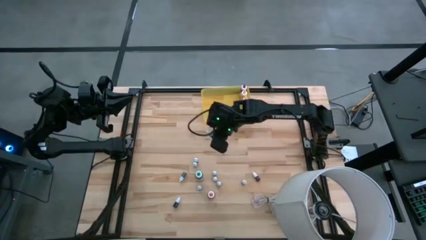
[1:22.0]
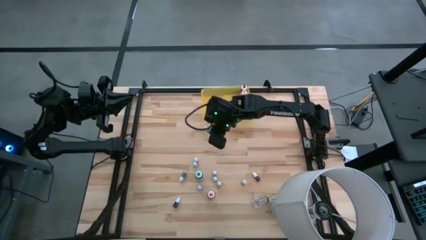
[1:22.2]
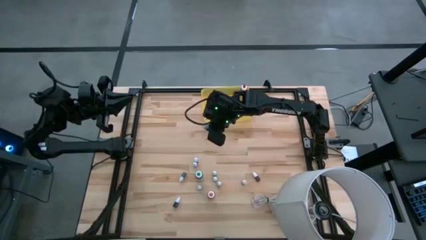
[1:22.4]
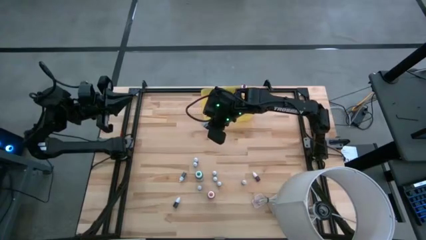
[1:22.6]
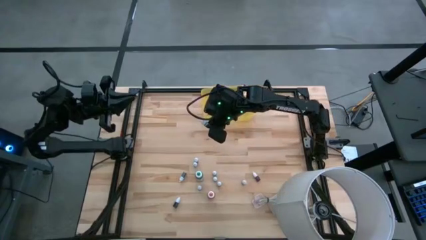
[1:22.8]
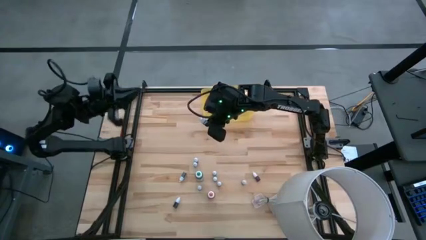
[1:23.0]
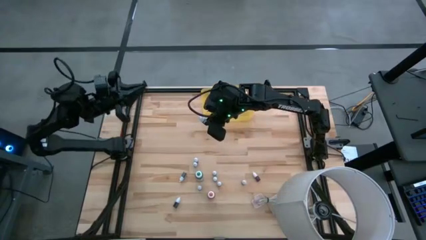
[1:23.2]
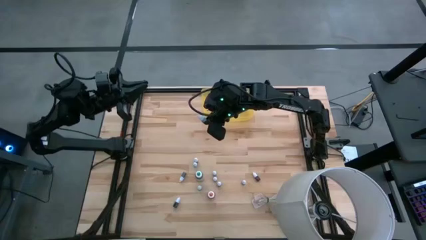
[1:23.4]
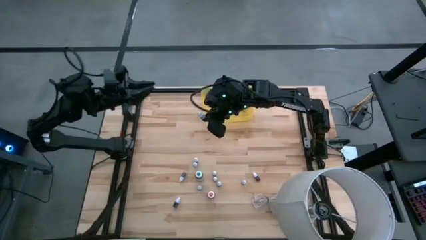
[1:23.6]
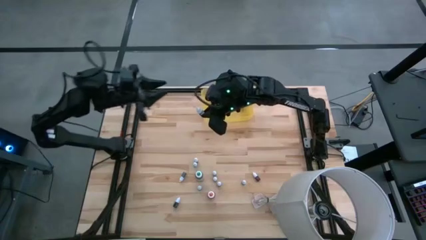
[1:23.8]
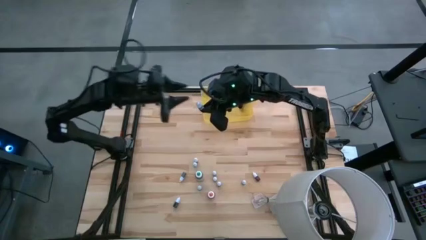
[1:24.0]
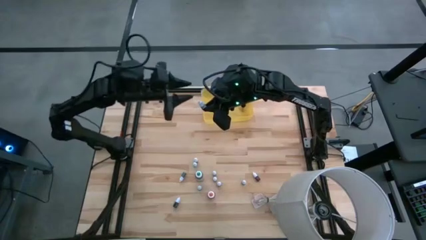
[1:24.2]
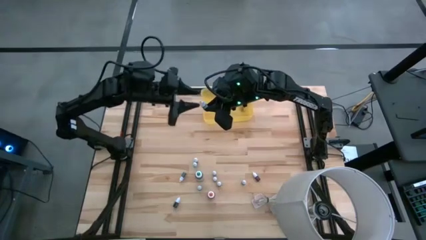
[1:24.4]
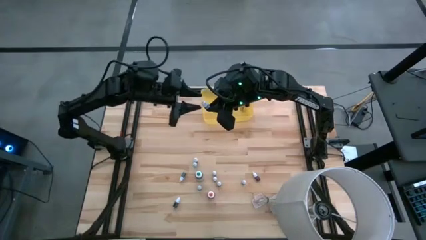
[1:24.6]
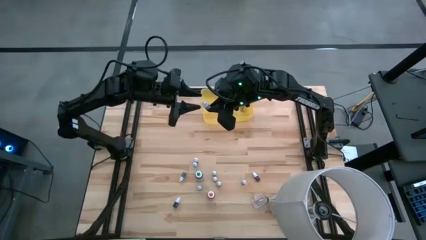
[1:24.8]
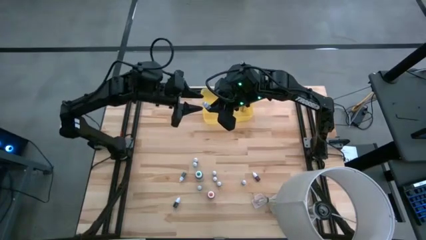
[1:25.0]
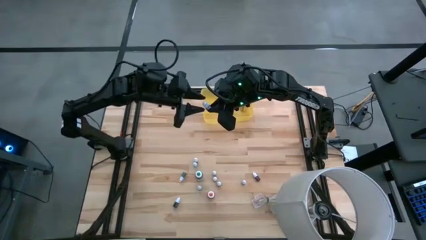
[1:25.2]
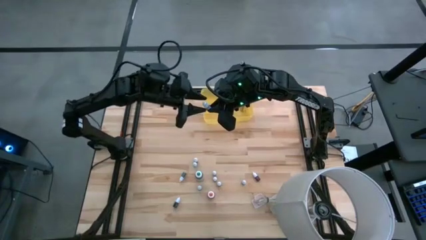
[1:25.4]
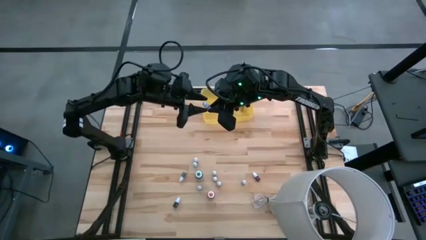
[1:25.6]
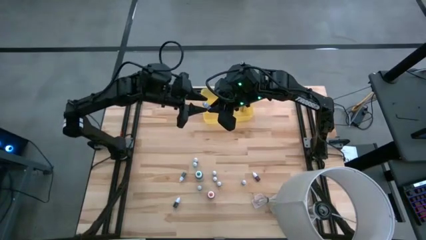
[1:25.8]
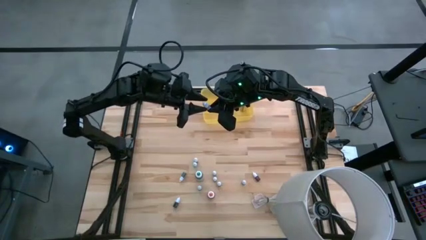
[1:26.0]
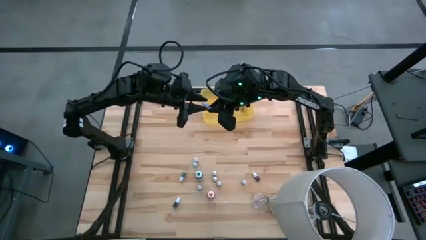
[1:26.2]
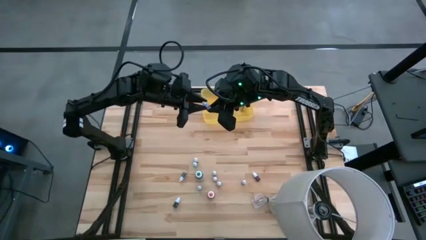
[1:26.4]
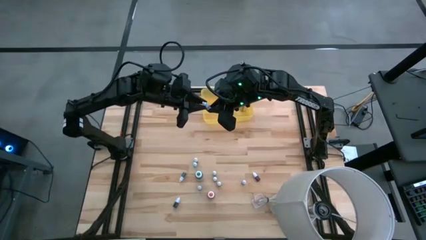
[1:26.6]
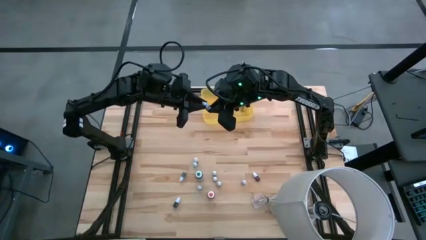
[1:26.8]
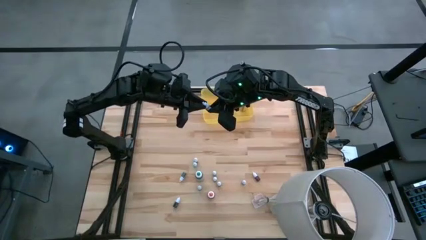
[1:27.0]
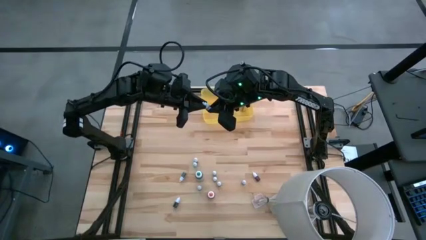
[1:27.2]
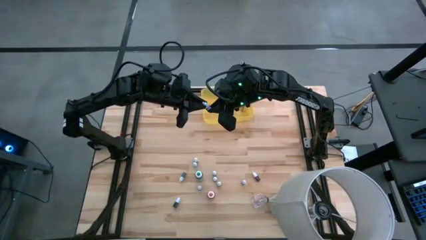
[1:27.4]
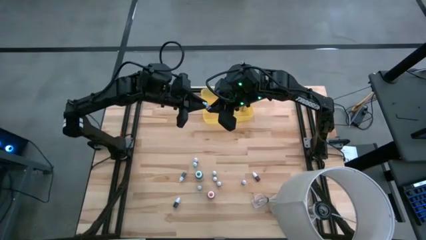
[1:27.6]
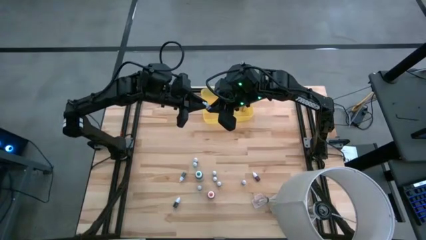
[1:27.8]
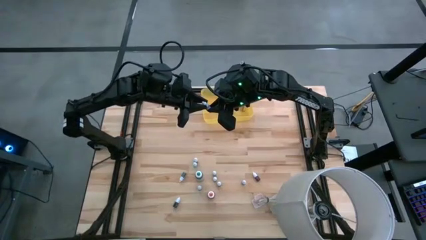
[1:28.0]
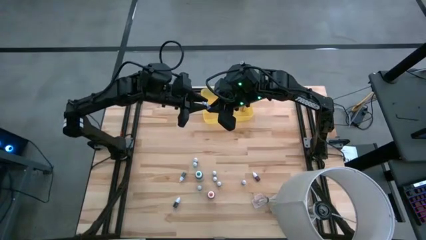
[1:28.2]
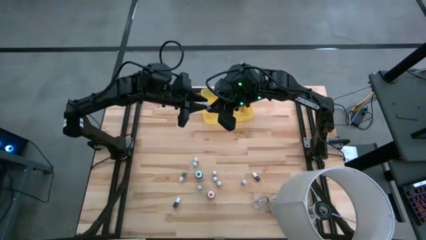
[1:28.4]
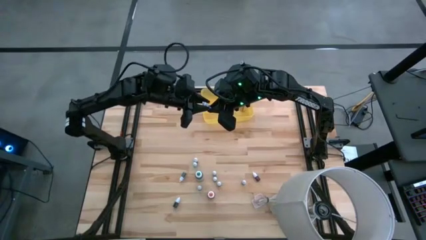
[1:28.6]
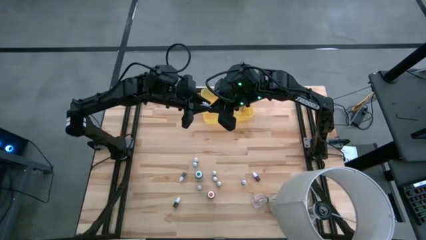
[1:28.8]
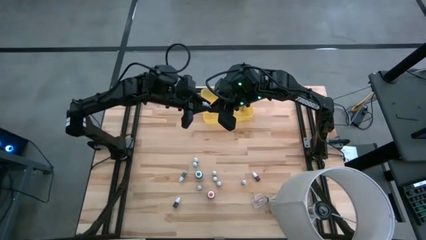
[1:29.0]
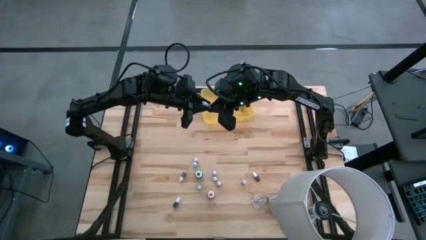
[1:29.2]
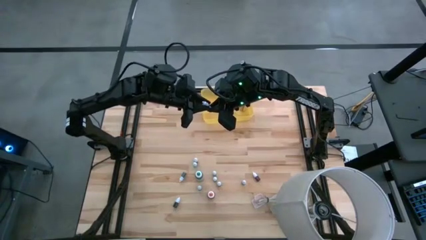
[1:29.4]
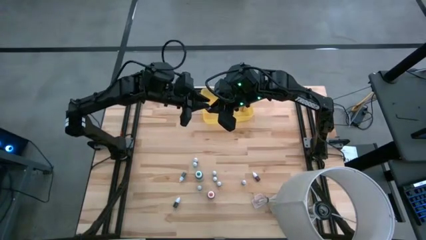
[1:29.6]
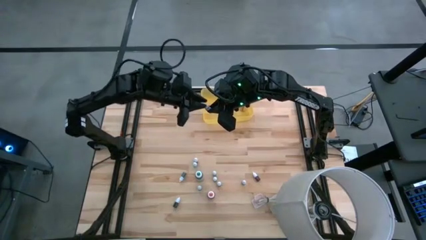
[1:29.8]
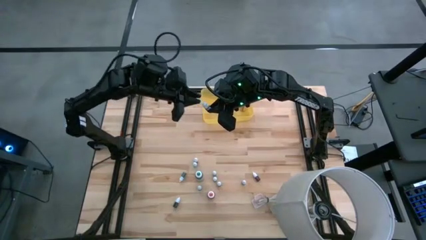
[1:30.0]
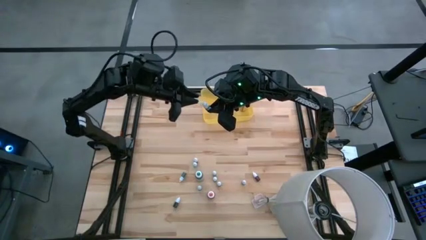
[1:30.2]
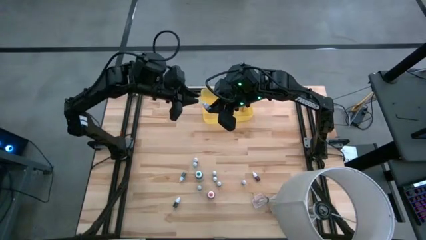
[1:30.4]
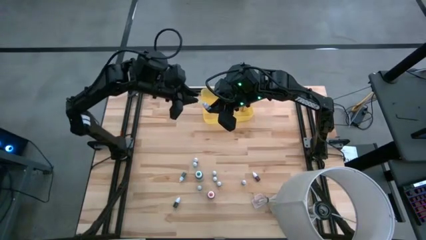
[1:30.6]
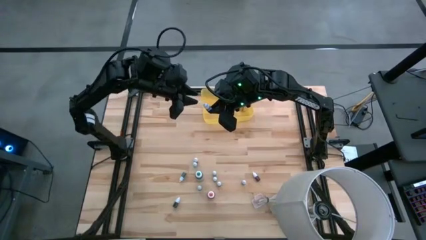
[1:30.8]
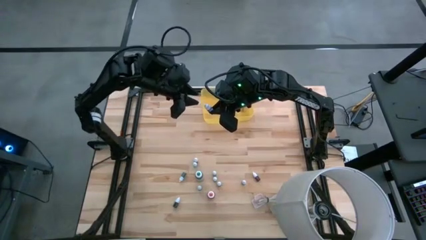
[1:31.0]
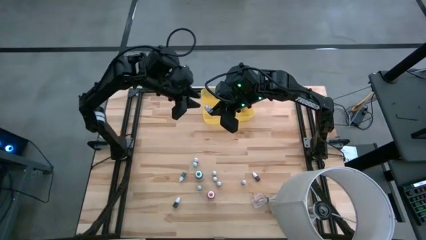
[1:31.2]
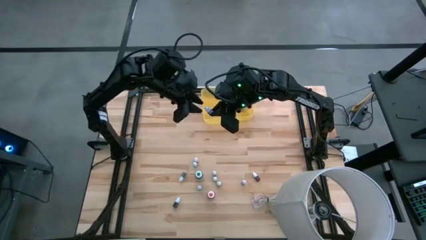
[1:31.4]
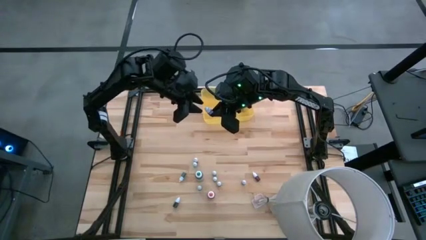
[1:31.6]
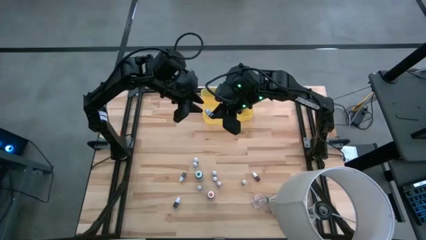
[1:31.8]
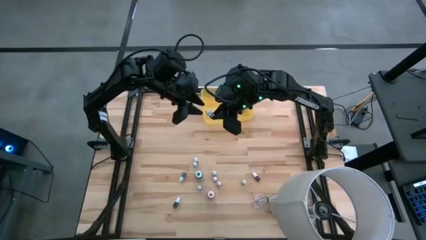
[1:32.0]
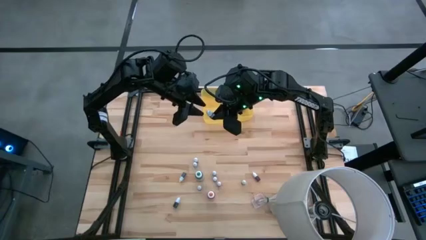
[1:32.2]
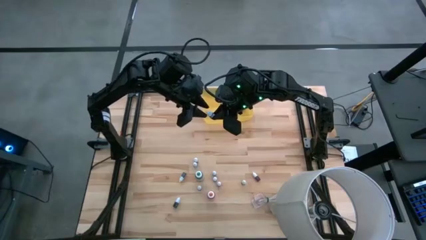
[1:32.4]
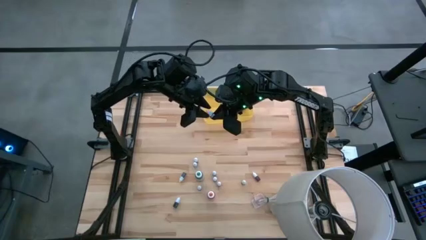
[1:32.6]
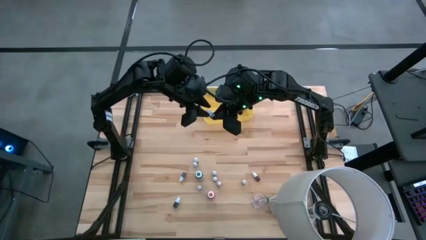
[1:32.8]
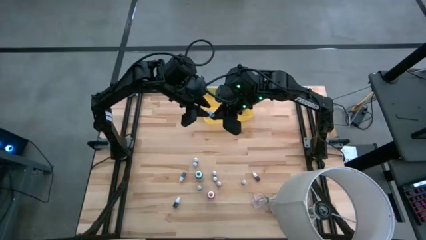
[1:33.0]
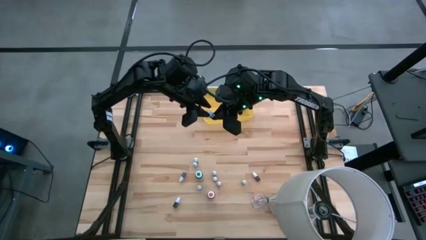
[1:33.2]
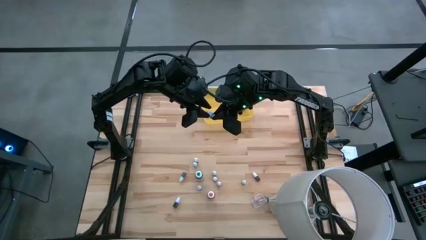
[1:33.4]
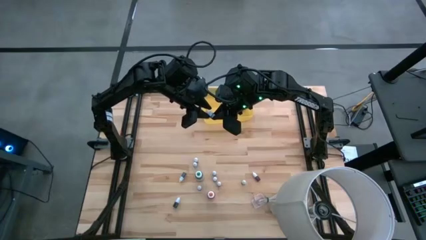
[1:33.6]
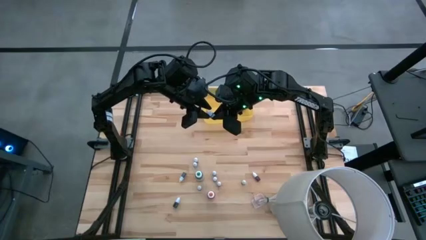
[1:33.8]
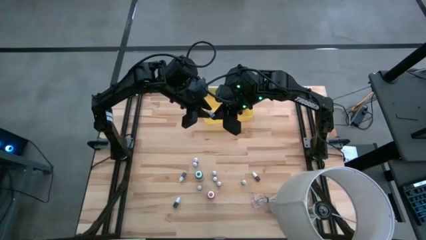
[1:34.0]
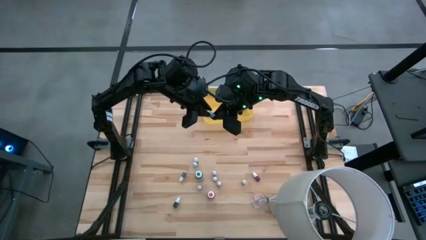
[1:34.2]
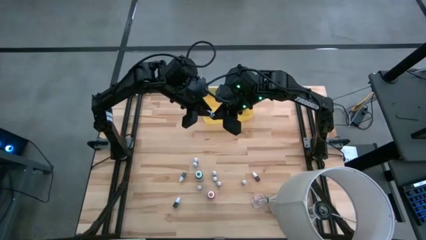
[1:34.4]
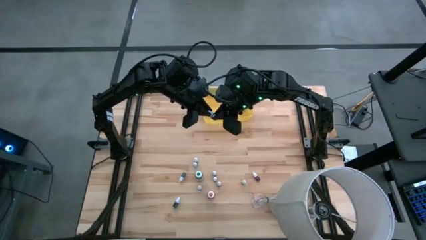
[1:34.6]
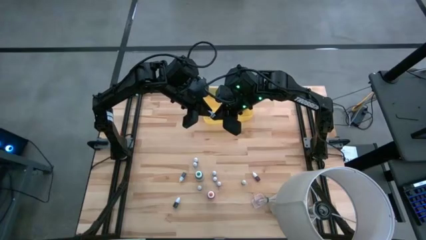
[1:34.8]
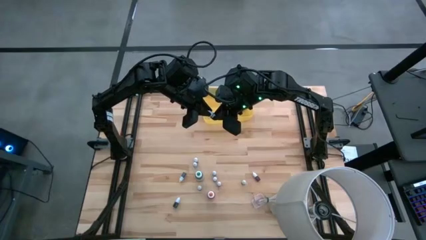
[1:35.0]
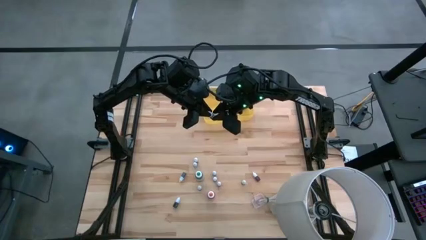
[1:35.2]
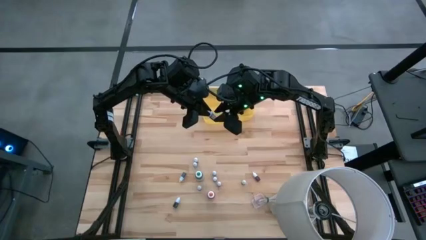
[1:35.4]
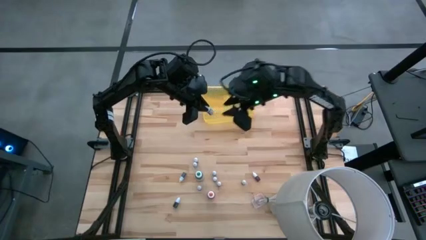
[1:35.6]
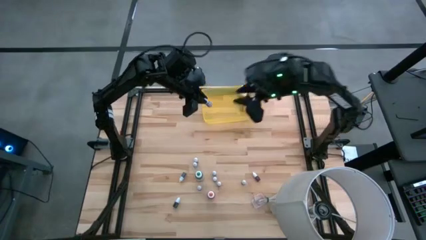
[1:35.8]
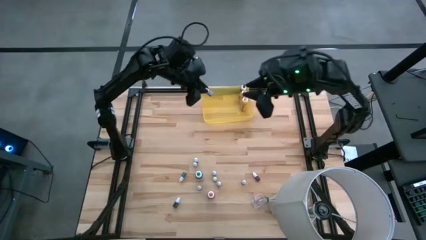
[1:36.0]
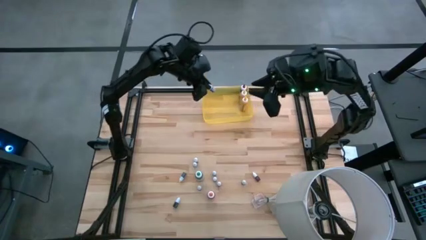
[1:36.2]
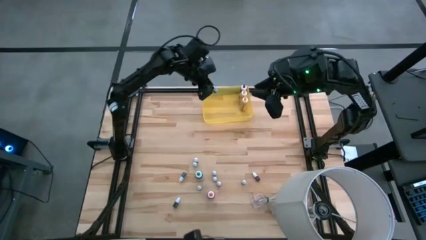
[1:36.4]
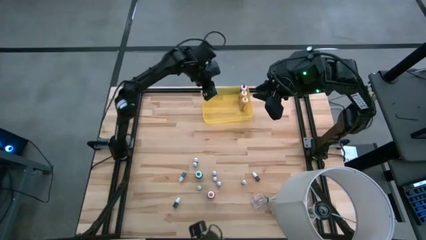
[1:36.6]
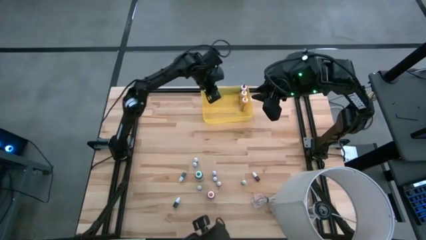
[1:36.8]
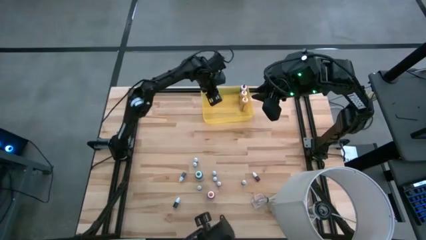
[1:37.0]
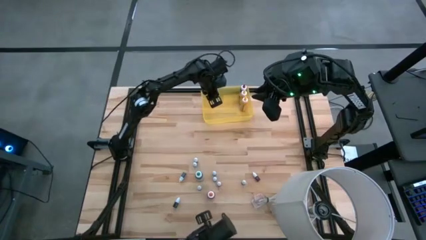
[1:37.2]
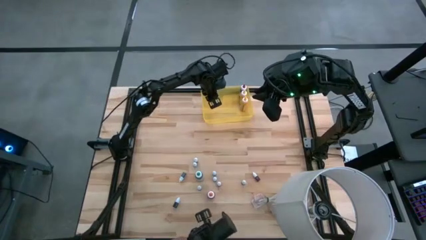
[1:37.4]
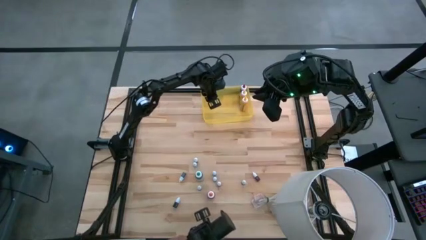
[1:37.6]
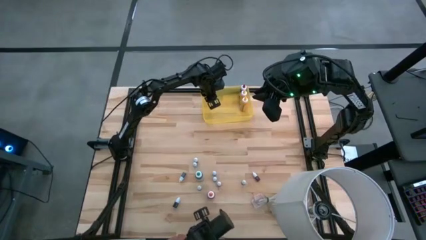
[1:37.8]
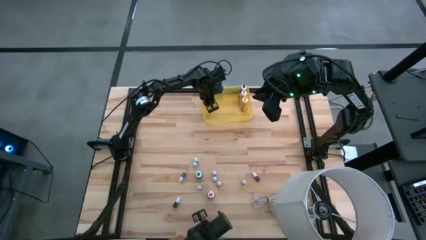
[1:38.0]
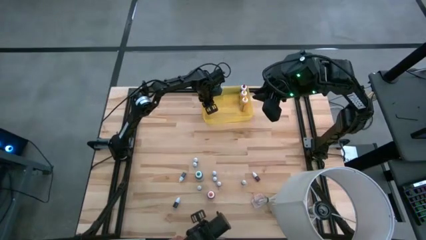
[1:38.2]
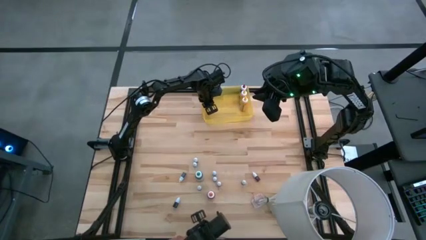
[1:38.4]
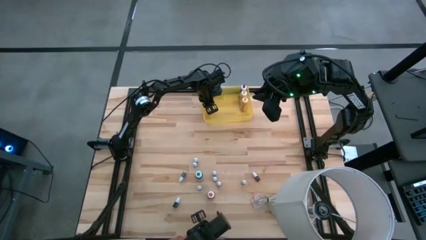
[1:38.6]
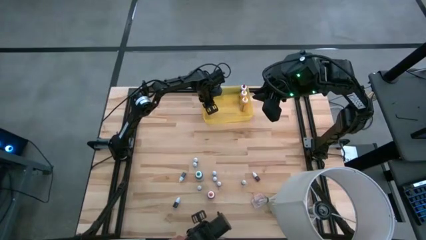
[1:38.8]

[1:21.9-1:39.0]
Task: Pick & Place food coloring
Put the top small black food coloring bottle into the yellow bin
